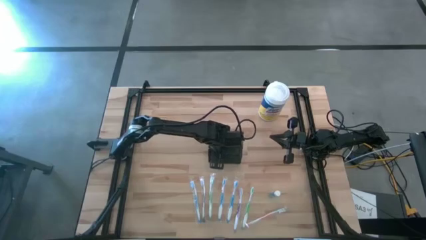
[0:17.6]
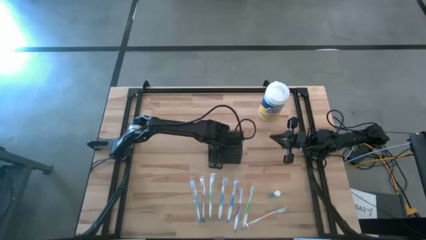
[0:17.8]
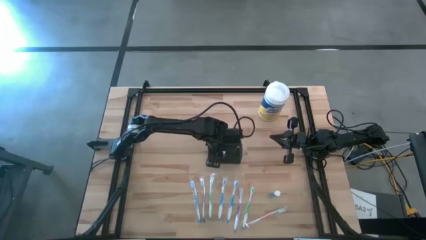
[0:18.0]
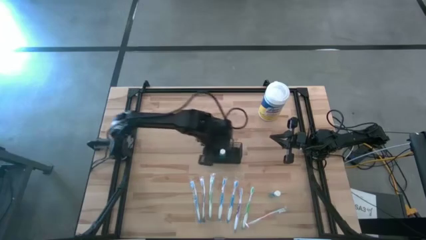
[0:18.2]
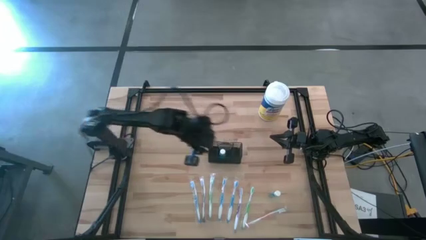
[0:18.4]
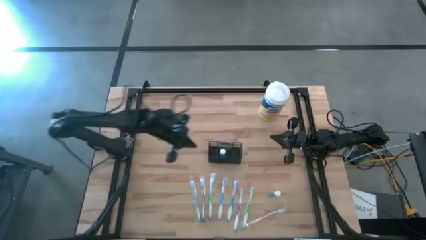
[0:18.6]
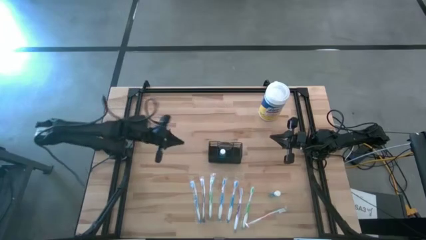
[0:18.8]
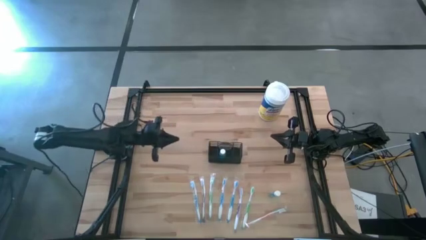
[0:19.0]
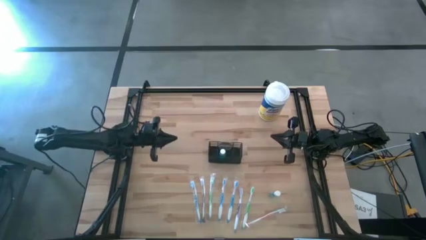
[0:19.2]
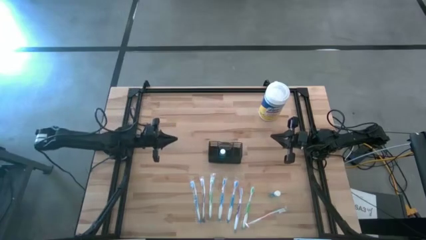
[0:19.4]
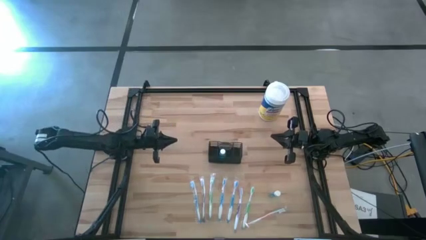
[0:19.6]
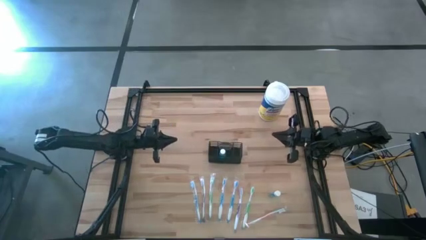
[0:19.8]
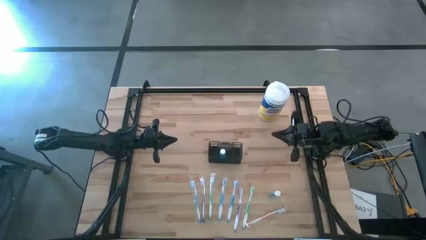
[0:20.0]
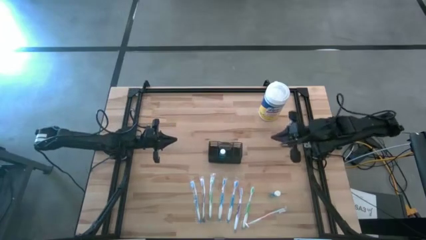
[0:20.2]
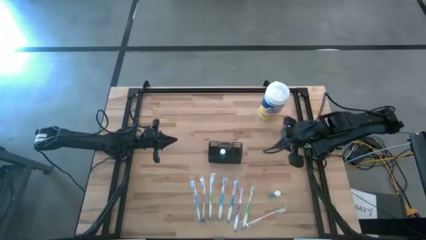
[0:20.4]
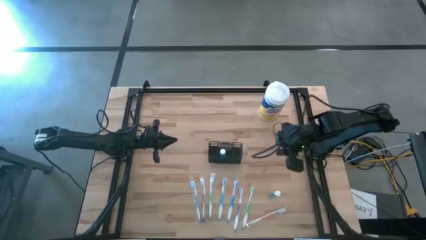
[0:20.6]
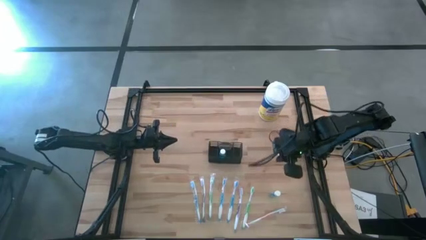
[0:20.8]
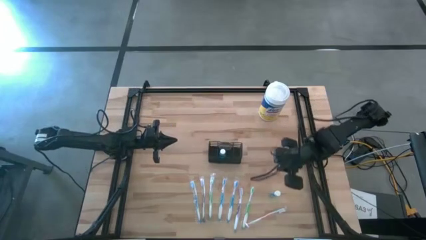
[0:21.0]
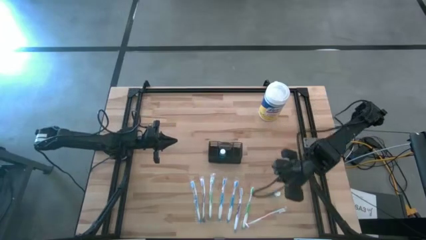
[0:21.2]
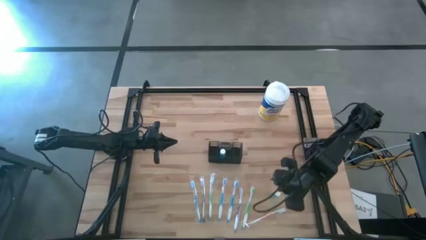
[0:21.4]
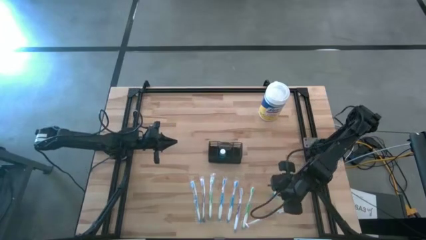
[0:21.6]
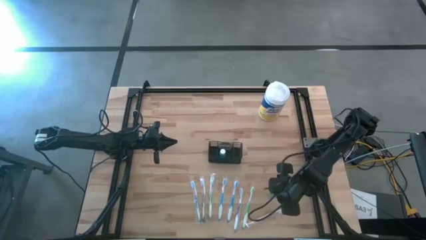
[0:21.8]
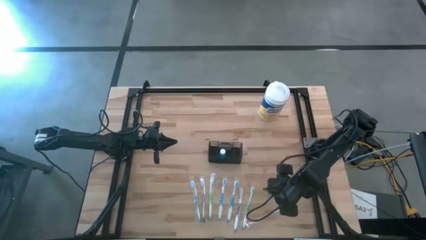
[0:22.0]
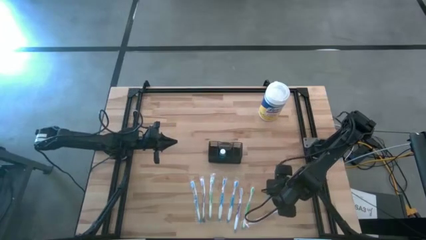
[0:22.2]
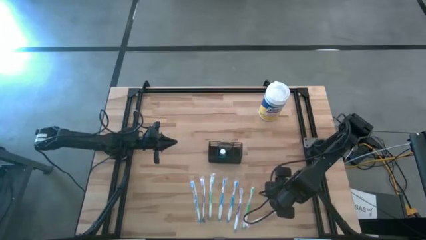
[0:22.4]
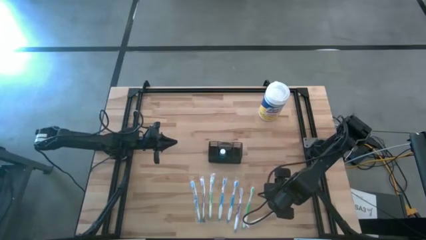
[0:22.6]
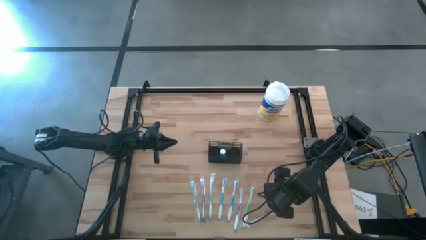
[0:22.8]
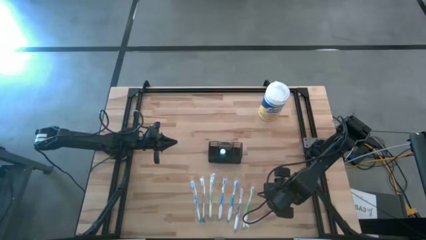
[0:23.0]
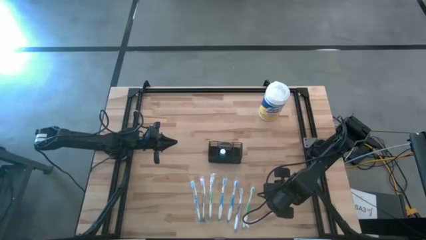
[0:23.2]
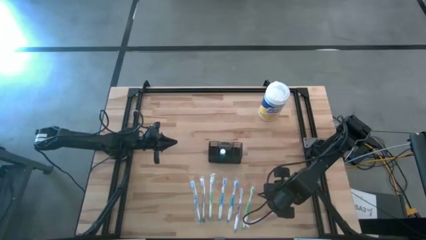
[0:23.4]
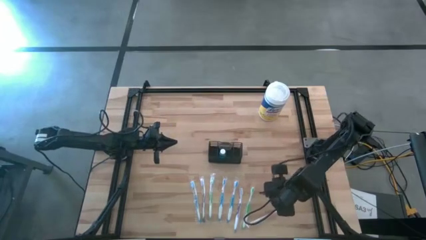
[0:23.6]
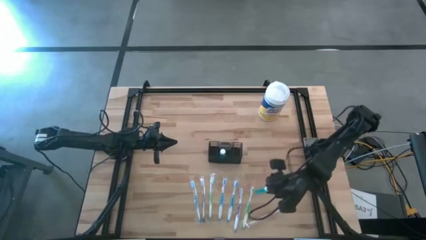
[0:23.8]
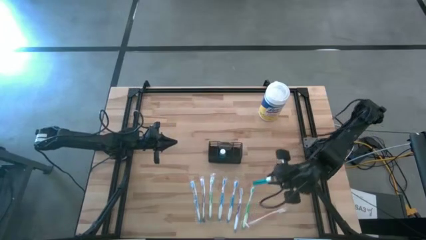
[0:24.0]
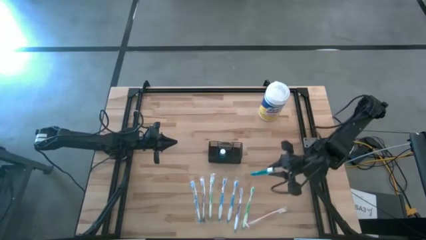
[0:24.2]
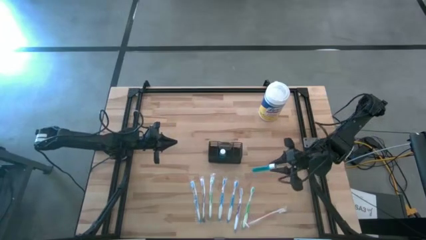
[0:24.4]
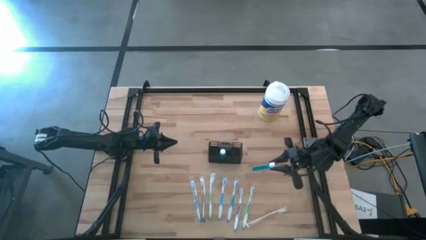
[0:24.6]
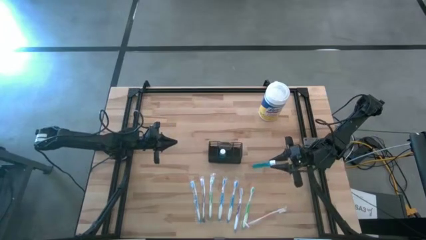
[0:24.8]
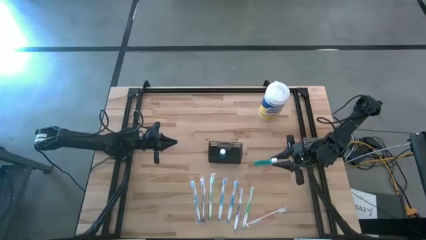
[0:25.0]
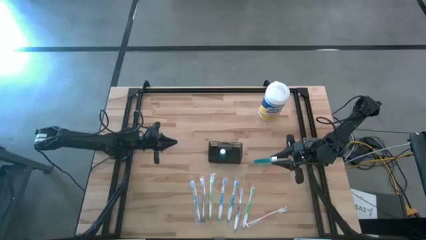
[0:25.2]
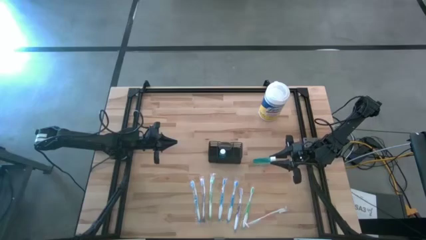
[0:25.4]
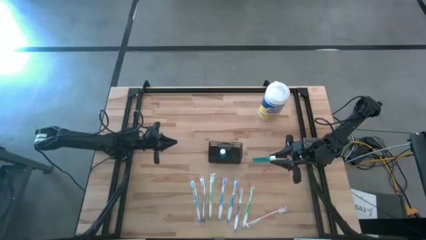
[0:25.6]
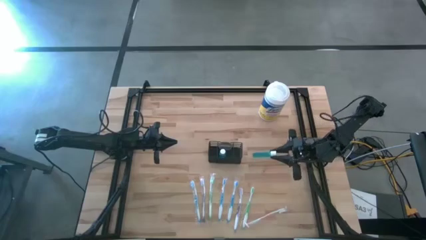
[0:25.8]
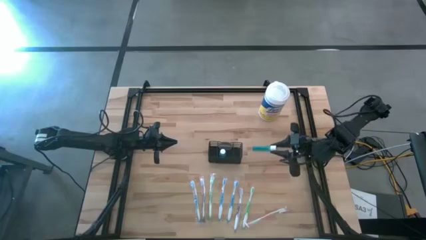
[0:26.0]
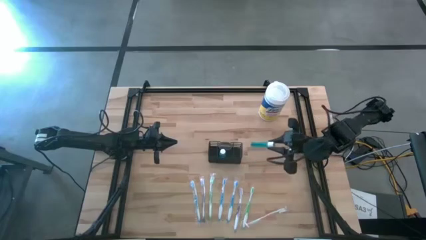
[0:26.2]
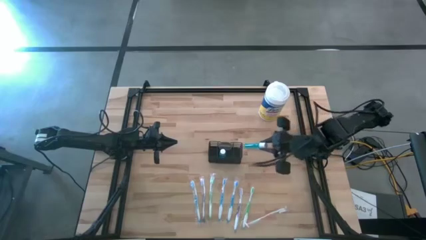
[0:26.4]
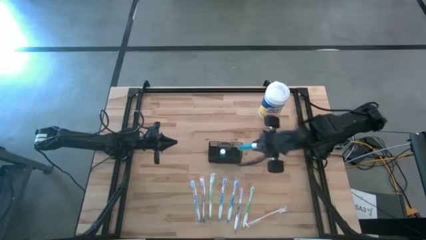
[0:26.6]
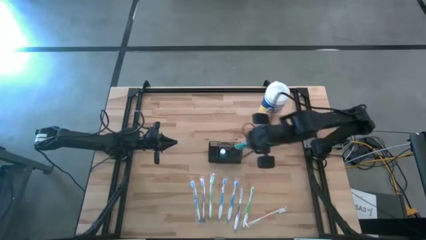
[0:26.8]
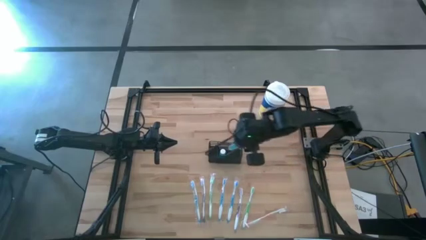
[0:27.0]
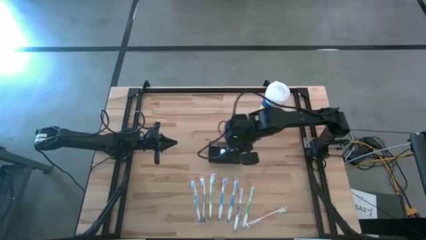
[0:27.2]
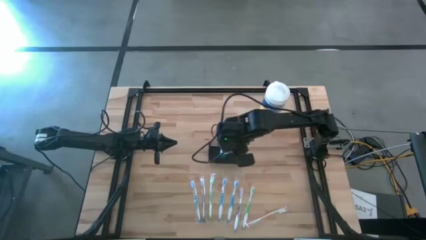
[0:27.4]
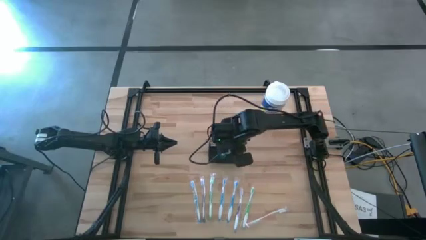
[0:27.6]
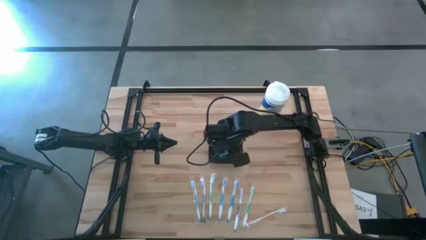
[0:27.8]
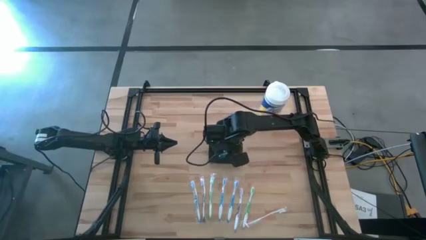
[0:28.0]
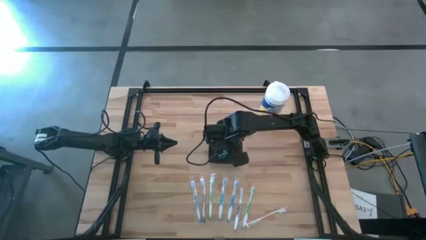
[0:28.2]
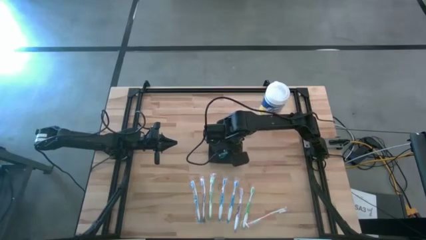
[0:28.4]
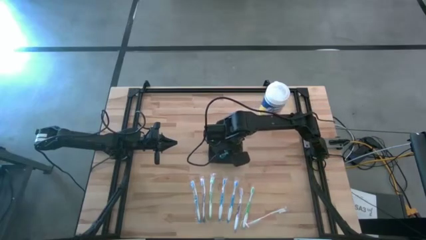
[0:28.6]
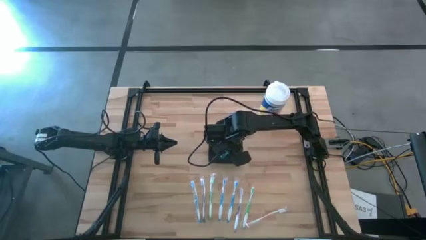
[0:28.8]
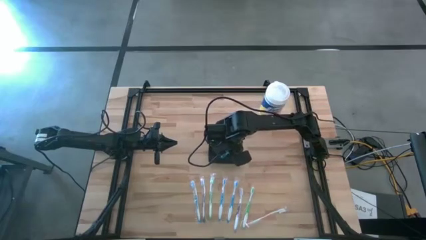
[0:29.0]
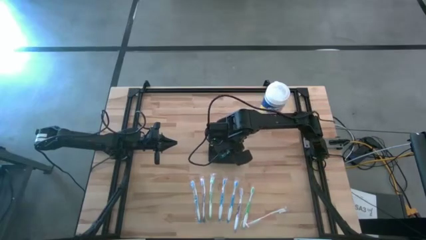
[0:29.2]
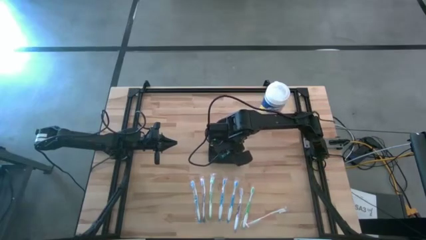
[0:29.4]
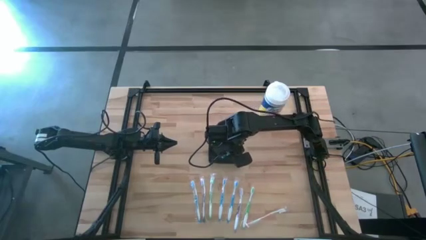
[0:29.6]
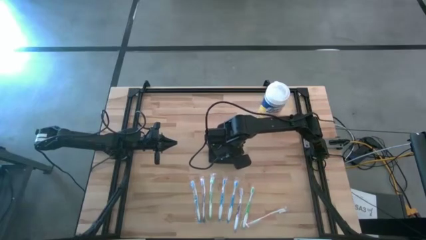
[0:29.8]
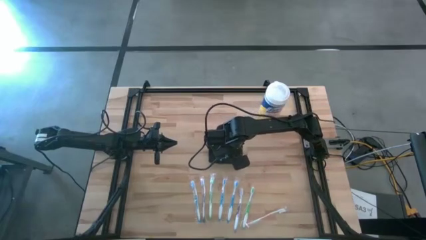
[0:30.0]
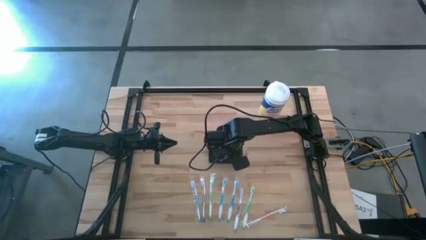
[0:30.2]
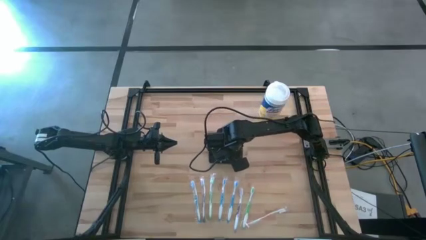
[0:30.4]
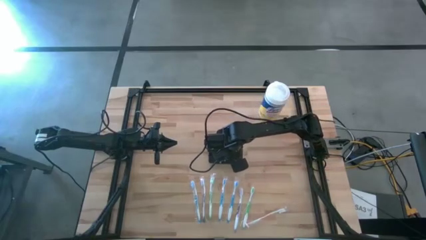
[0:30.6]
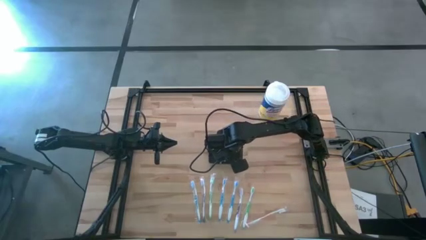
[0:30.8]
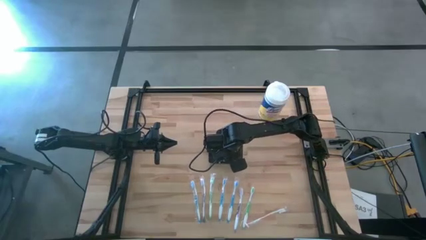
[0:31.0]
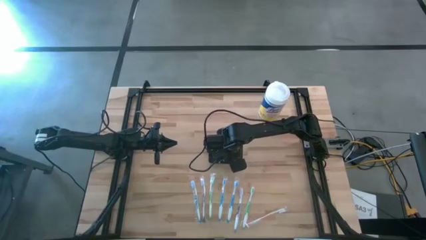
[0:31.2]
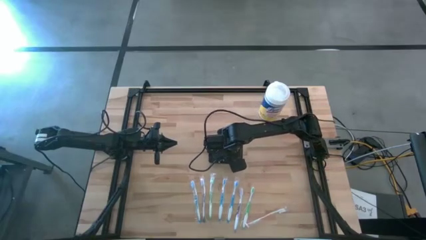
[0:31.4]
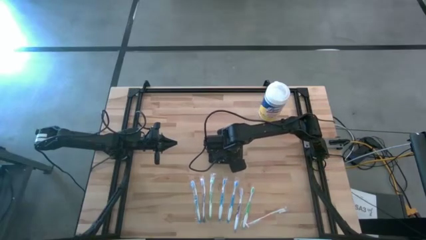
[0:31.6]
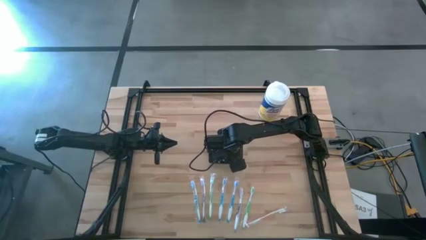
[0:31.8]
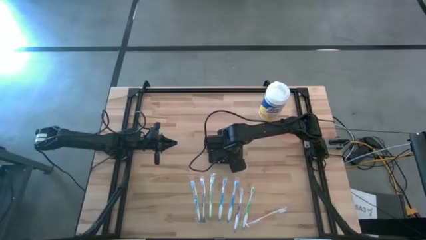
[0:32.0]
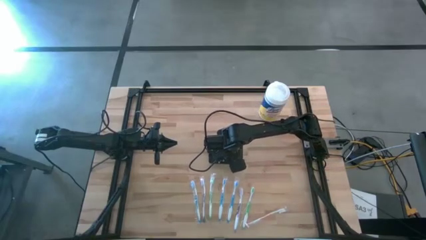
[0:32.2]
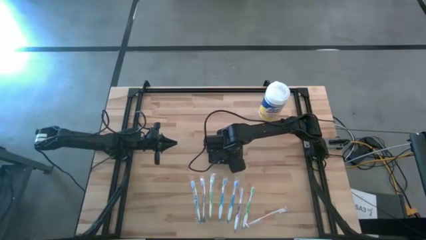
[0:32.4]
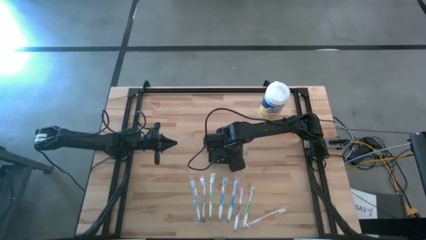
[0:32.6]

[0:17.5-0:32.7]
Task: Pick & Place toothbrushing station
Put the blue mouthwash into the wire organizer
